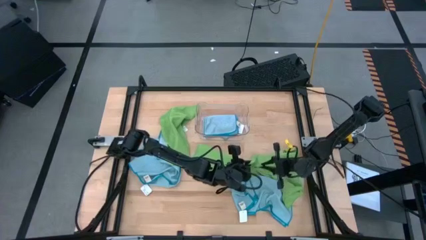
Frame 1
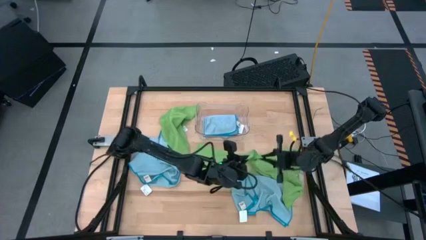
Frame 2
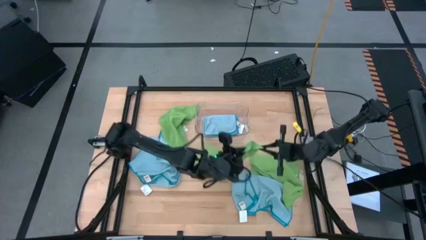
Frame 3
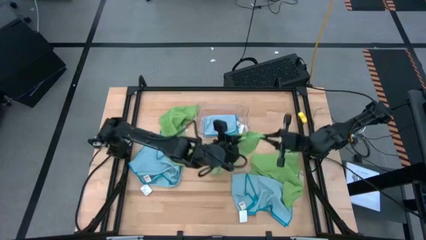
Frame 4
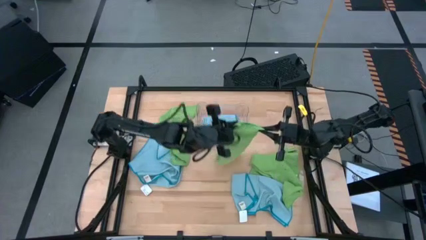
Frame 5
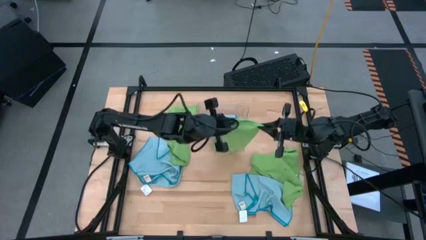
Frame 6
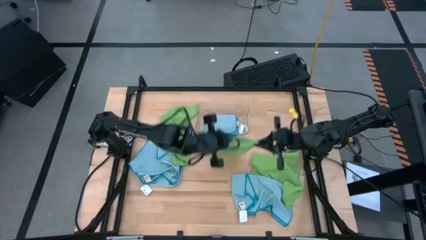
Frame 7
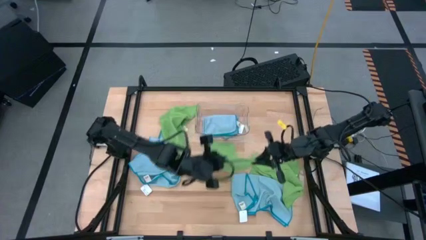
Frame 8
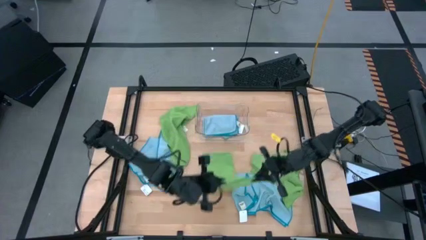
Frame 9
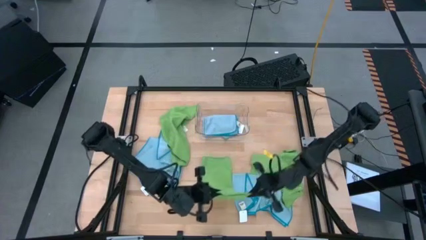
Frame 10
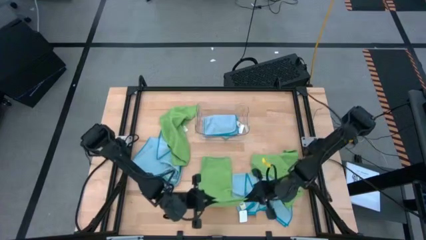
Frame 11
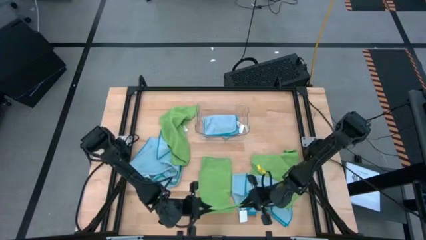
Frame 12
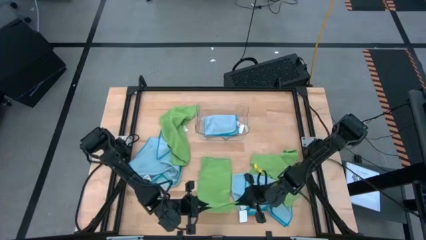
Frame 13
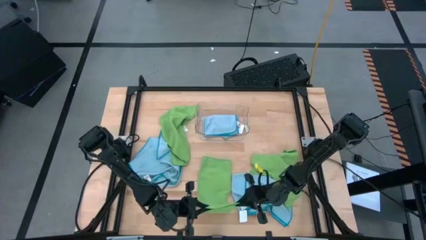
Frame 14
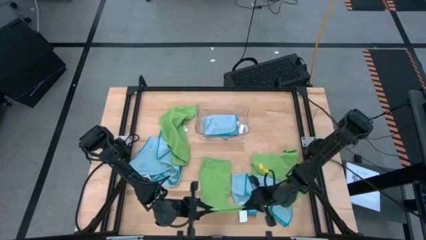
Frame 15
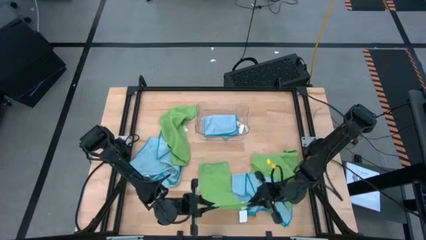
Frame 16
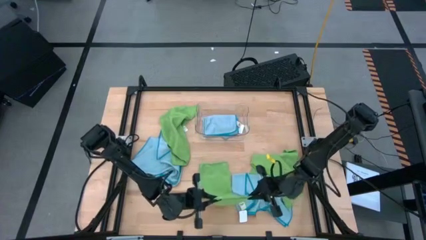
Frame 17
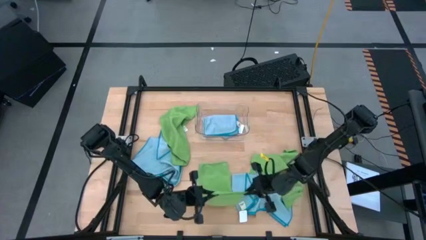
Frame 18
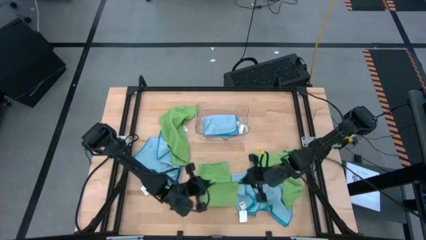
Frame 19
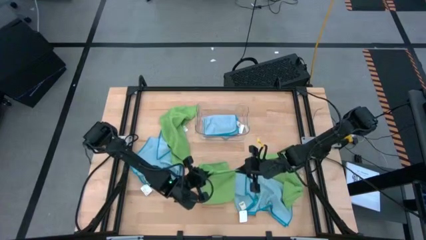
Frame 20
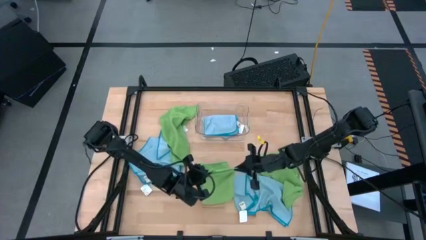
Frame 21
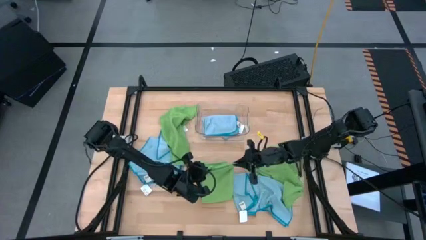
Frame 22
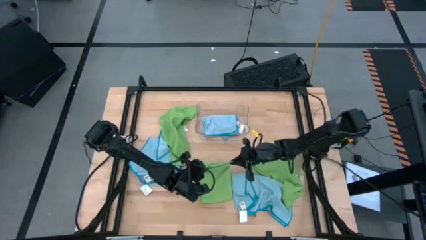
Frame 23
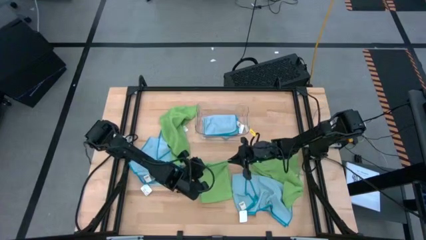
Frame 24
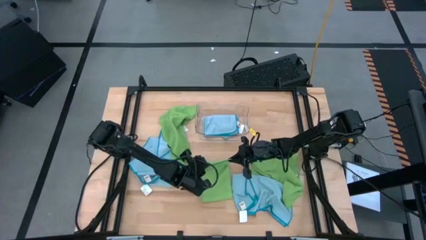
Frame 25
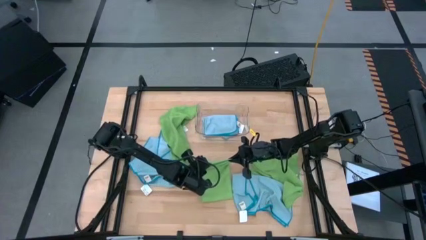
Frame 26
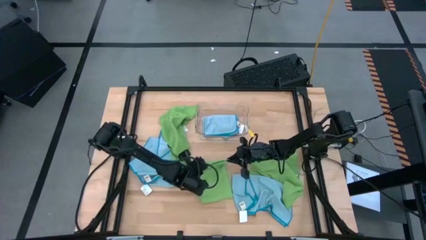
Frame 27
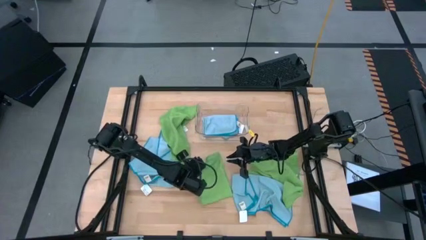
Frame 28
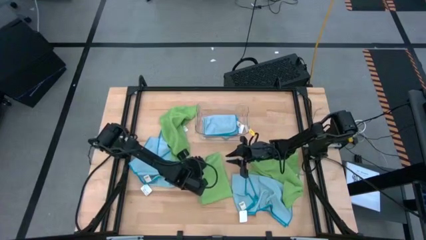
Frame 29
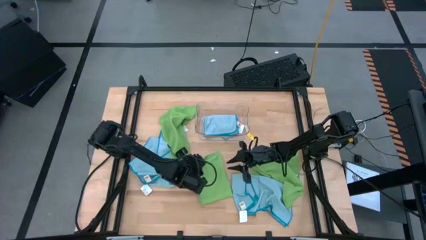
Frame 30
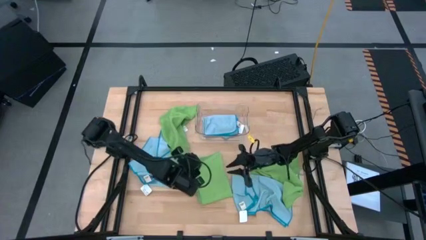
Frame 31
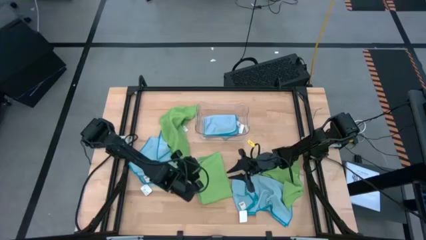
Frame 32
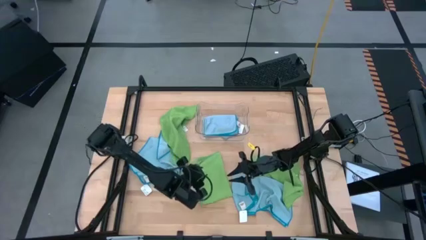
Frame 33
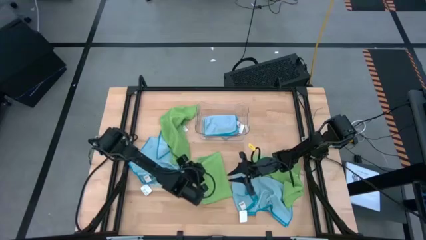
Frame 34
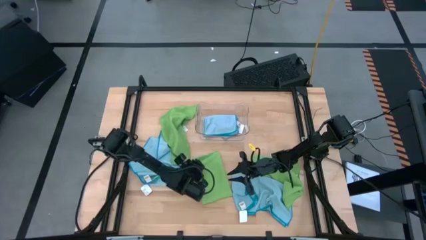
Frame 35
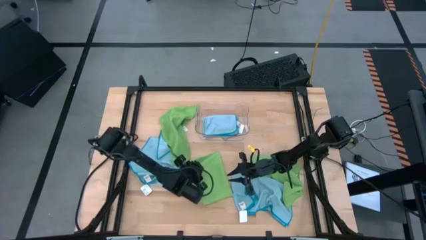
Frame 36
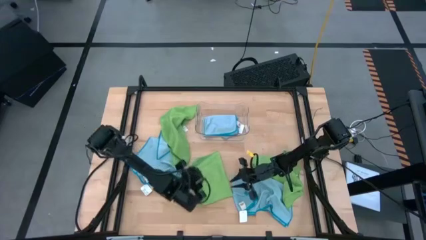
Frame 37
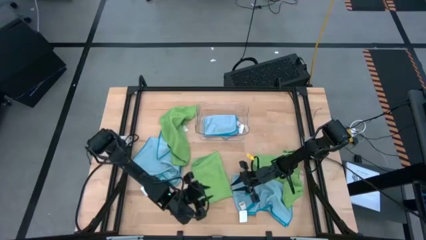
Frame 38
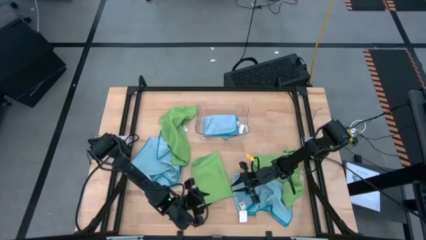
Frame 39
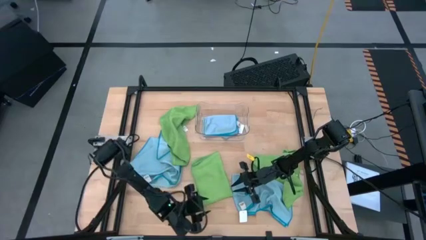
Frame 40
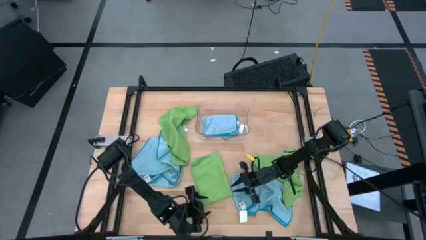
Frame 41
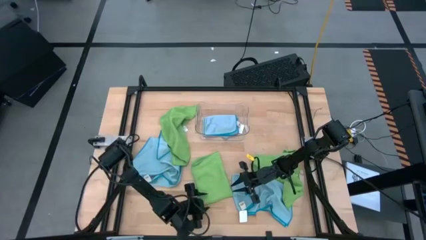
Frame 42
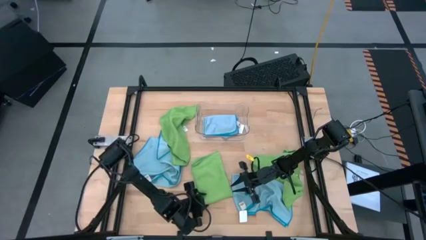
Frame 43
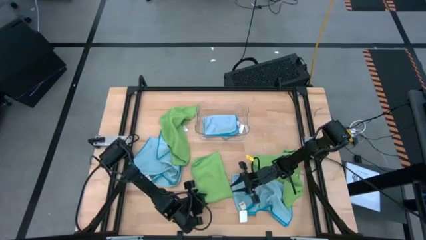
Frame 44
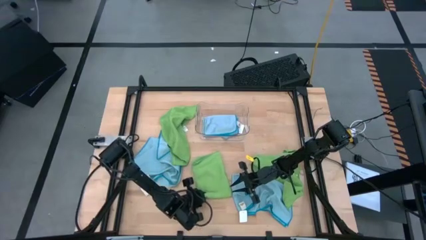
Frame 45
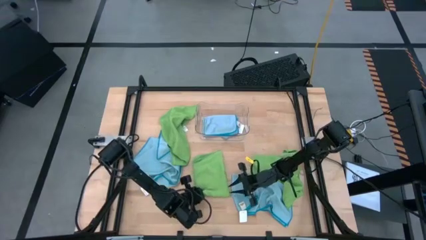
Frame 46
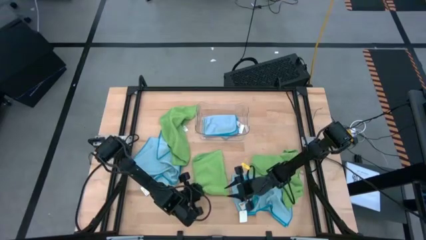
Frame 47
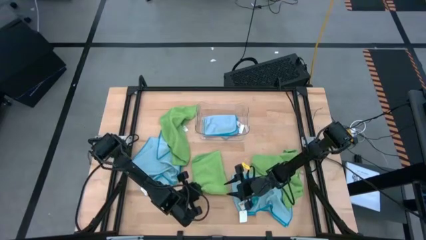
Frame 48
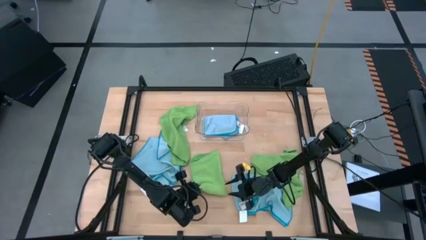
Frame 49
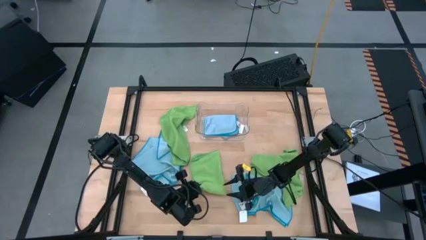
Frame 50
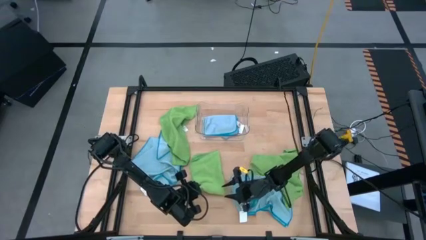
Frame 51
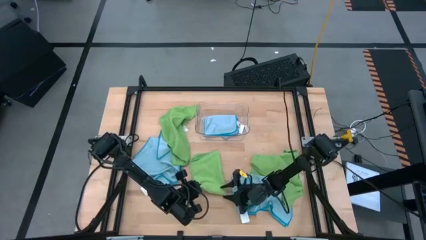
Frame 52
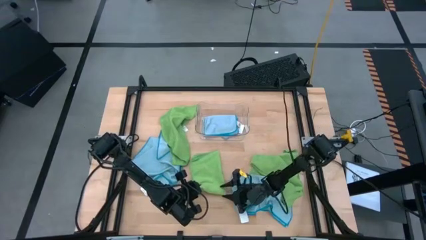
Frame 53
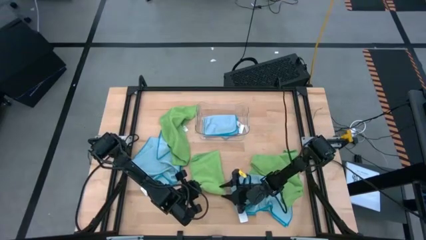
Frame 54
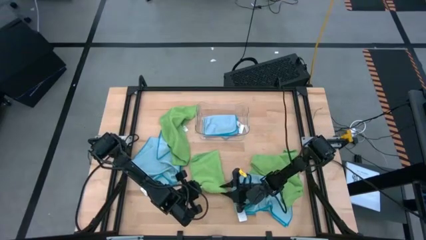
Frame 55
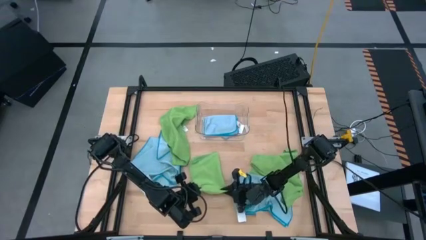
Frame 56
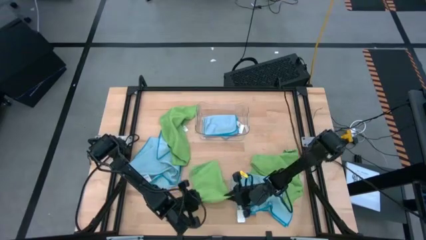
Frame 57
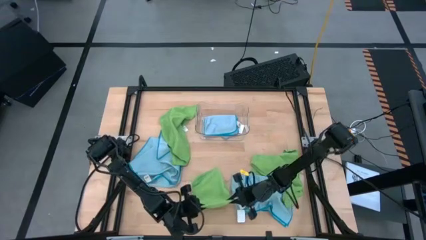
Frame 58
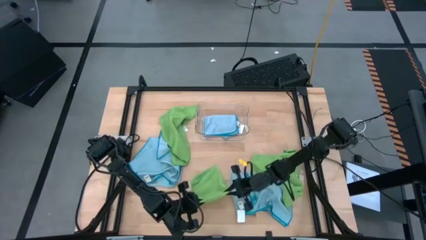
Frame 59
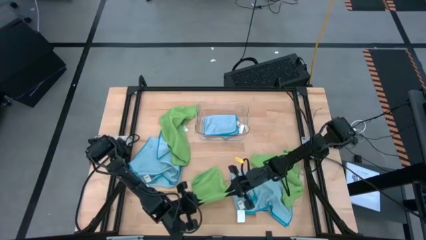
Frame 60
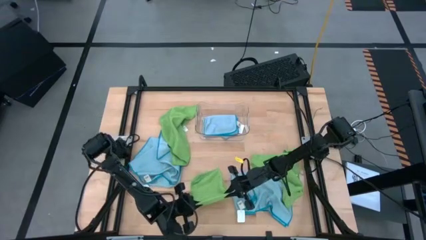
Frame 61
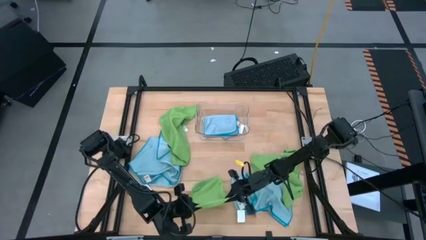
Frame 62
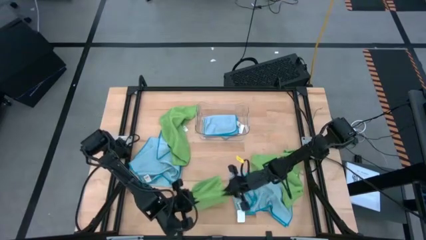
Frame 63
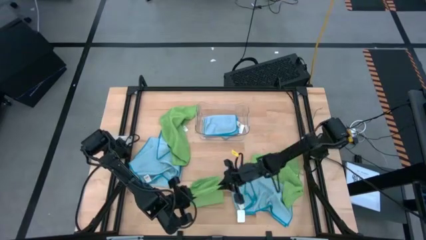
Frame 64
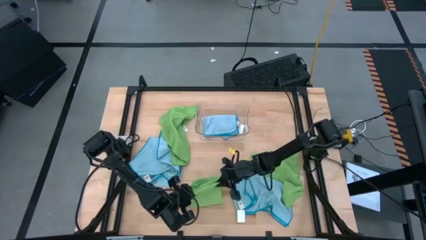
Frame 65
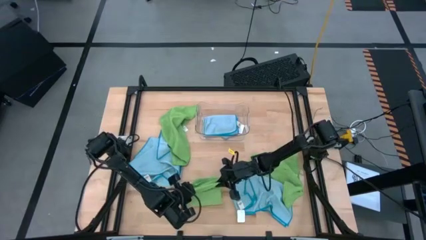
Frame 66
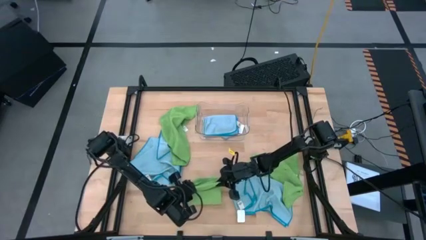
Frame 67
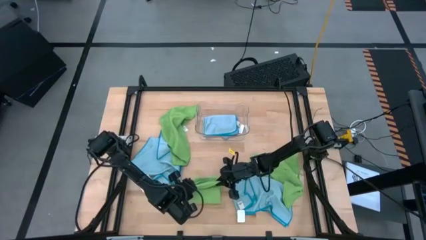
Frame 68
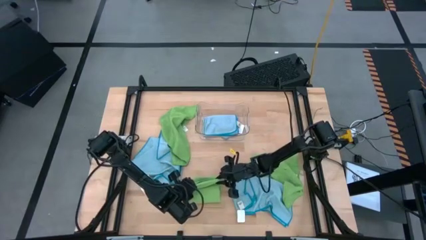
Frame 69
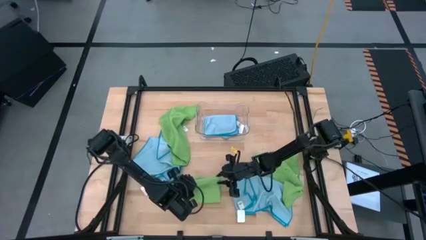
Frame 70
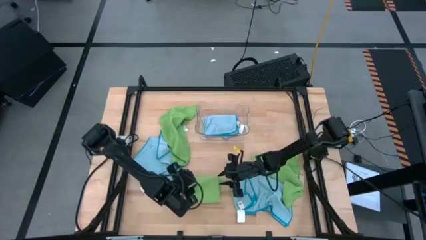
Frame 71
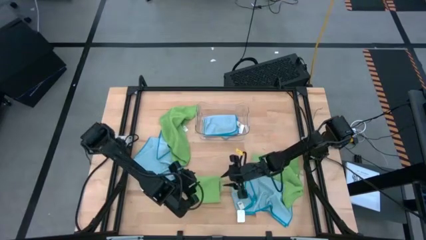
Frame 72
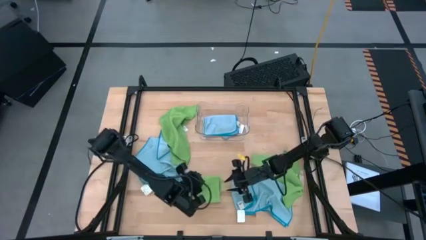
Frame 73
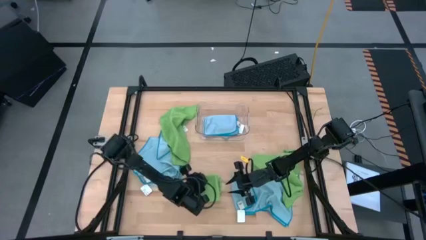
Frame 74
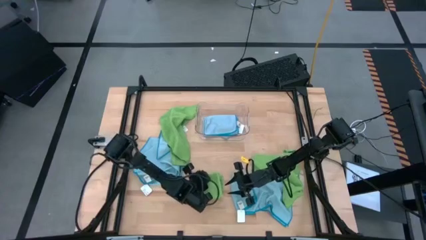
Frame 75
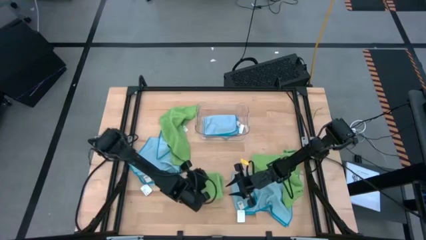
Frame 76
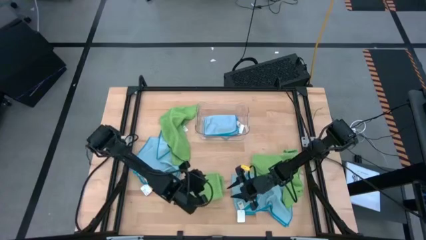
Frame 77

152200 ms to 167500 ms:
Task: Fold microfiber towels
Fold the bottom left green microfiber cloth
